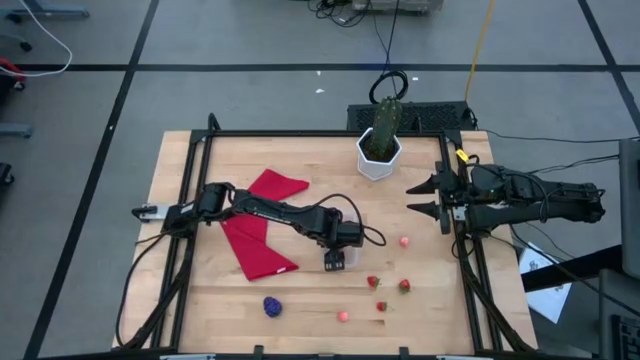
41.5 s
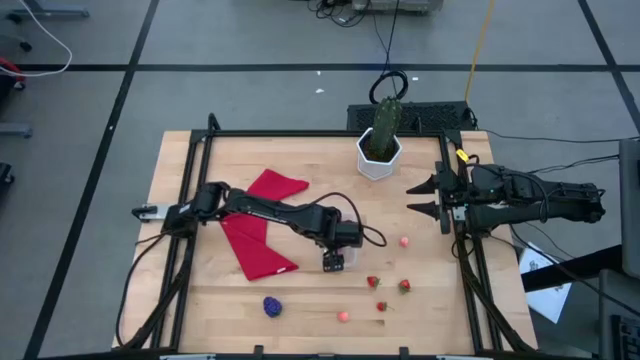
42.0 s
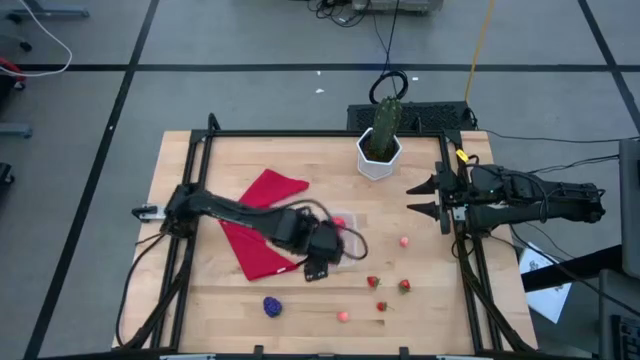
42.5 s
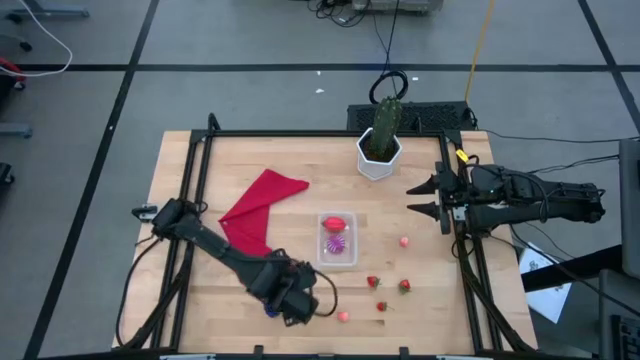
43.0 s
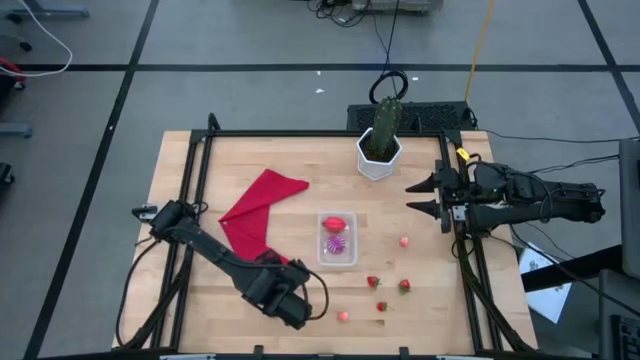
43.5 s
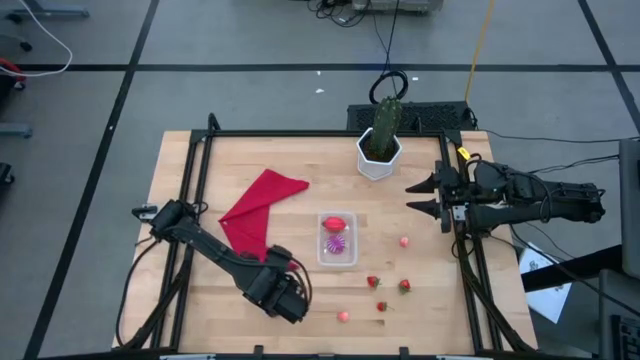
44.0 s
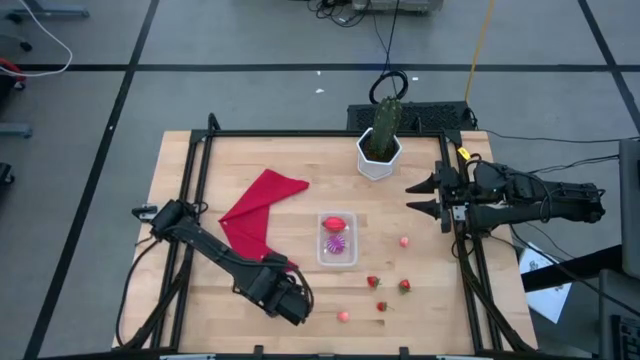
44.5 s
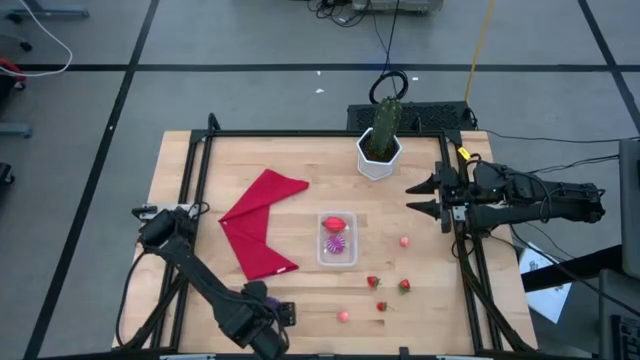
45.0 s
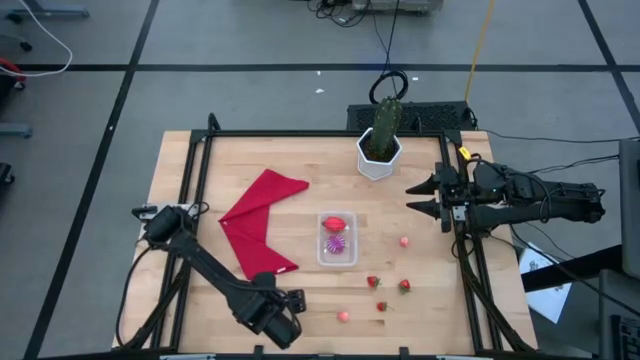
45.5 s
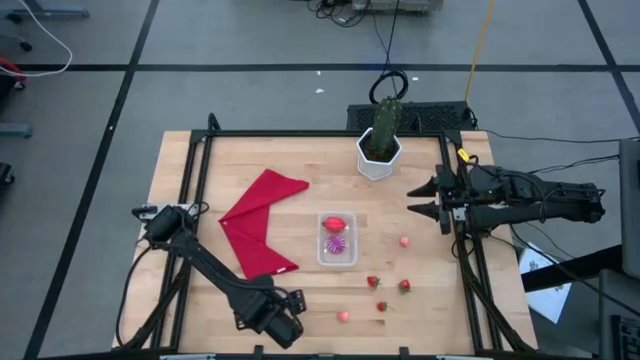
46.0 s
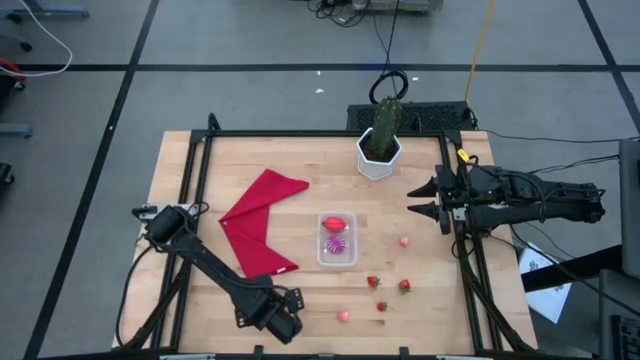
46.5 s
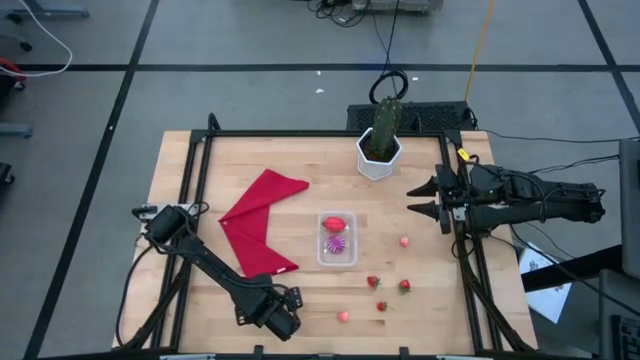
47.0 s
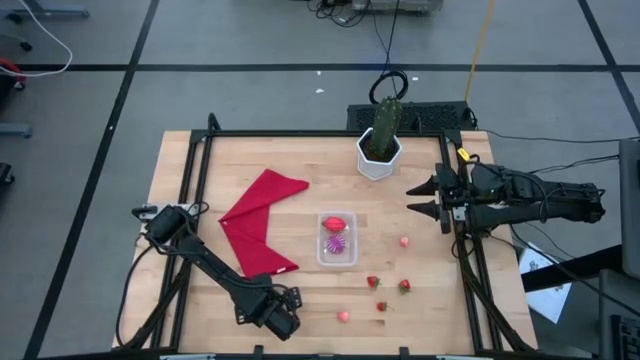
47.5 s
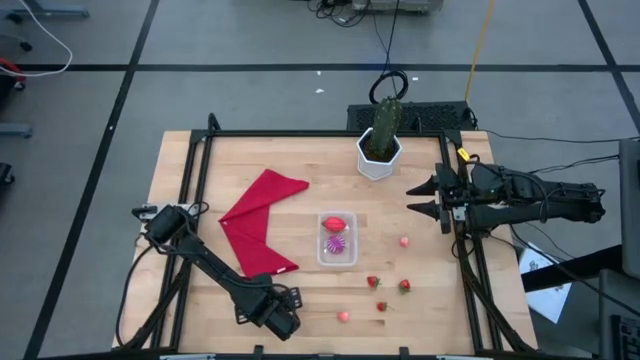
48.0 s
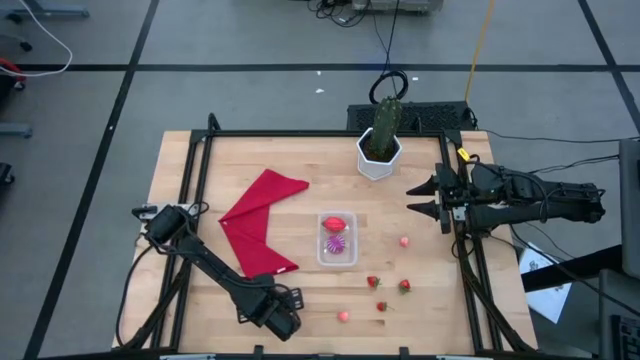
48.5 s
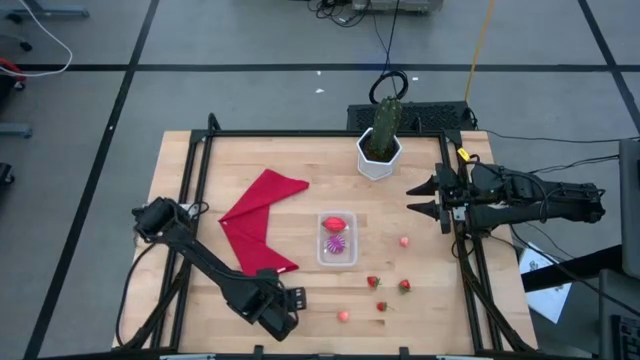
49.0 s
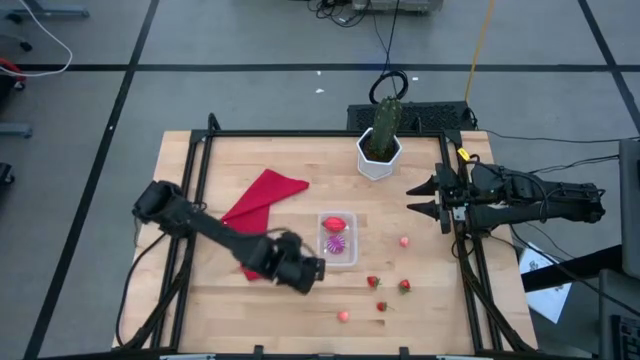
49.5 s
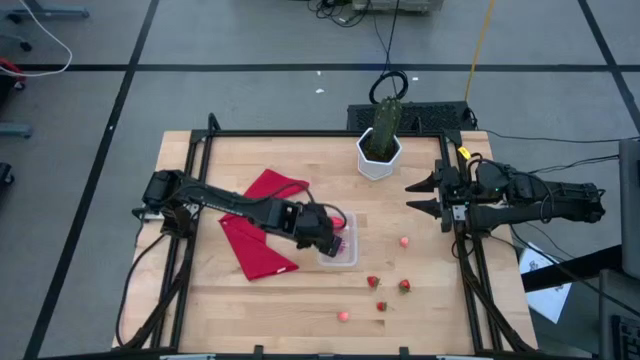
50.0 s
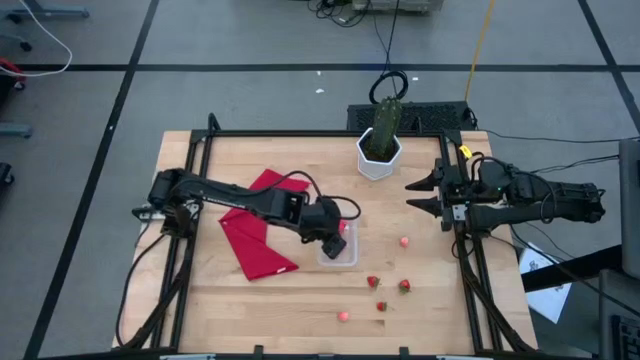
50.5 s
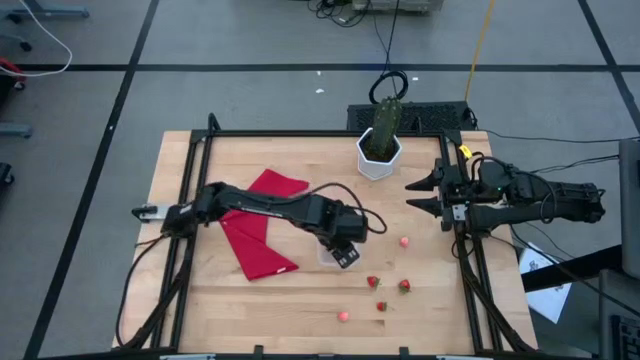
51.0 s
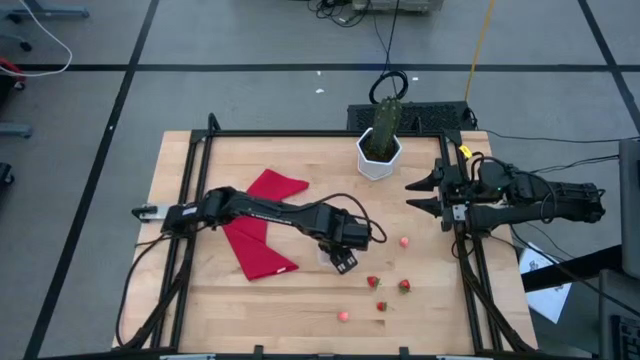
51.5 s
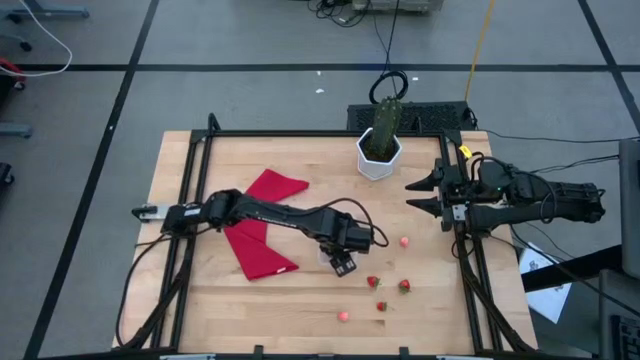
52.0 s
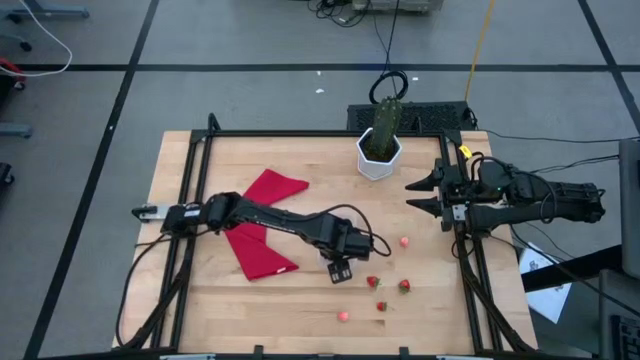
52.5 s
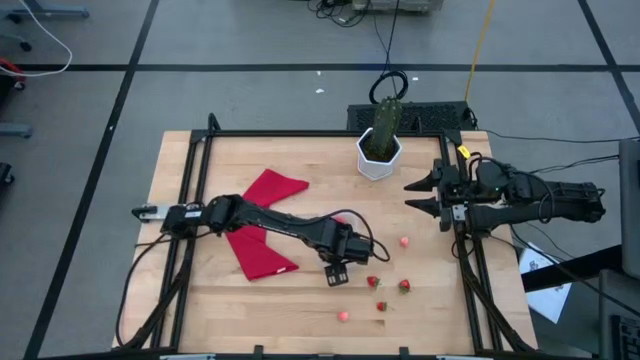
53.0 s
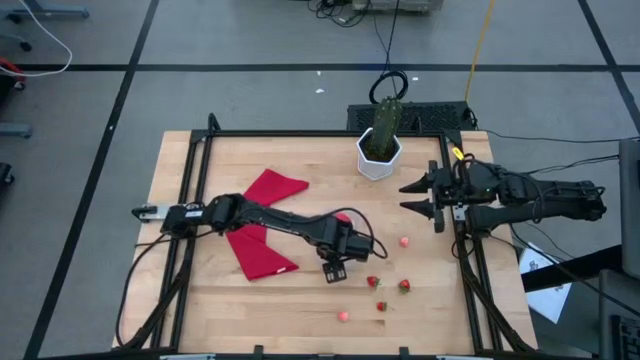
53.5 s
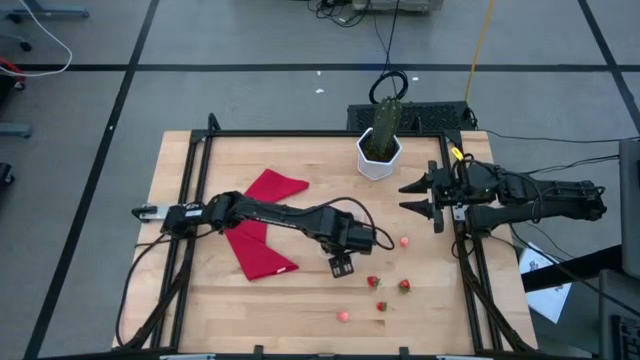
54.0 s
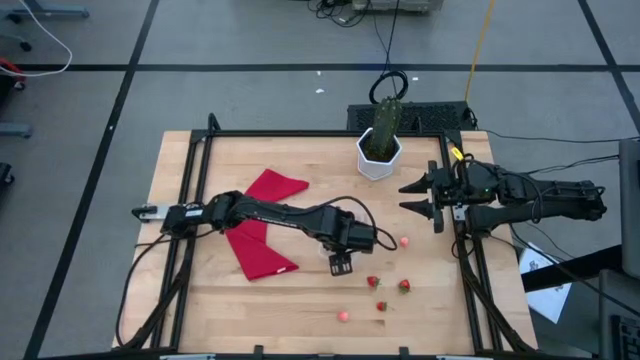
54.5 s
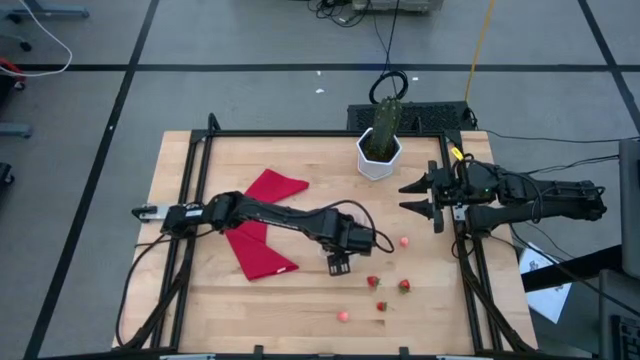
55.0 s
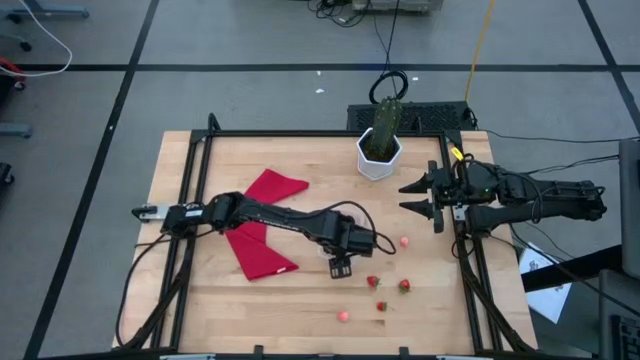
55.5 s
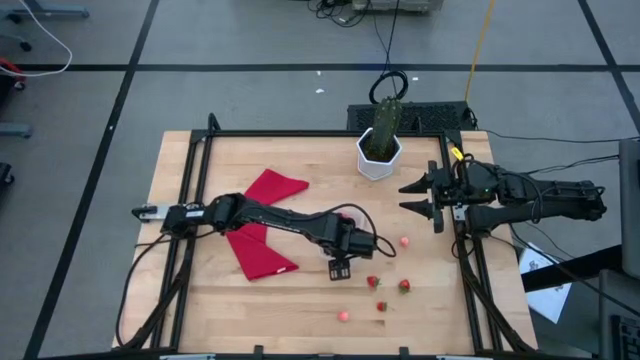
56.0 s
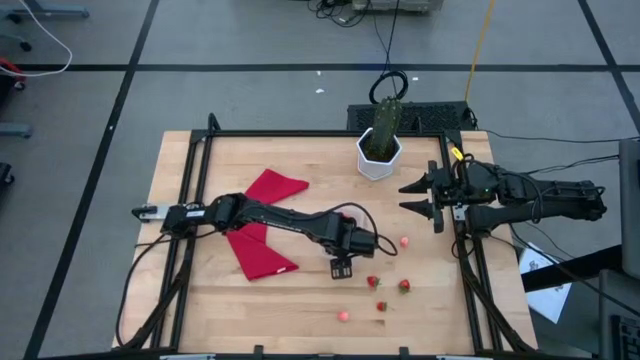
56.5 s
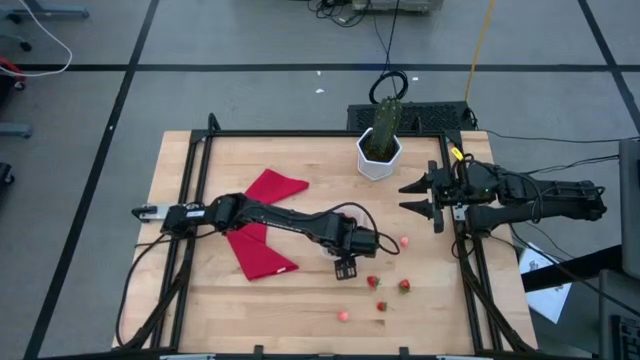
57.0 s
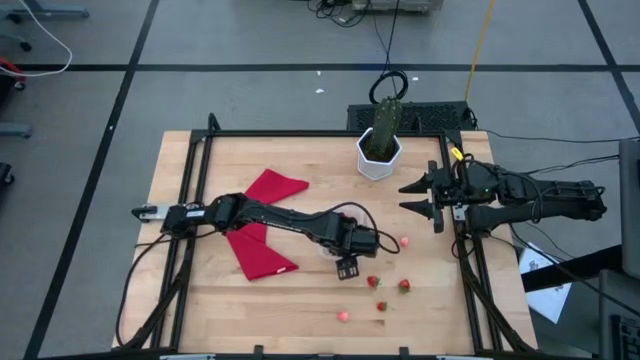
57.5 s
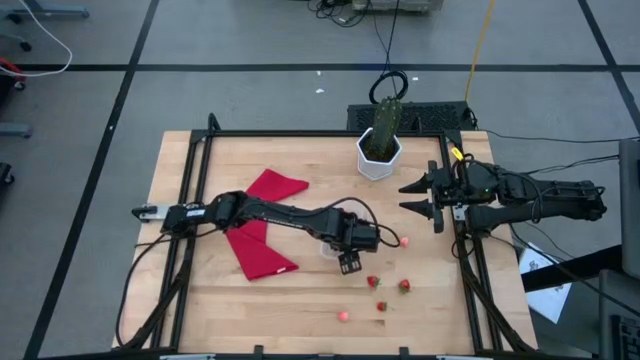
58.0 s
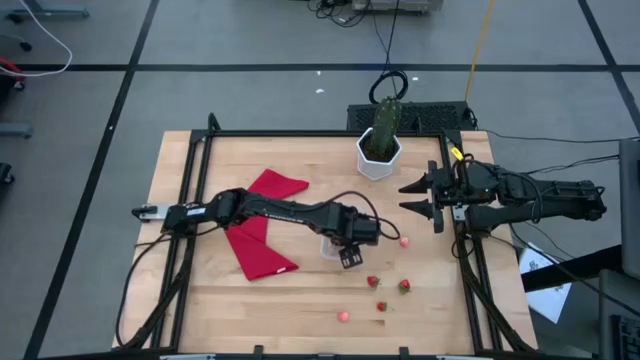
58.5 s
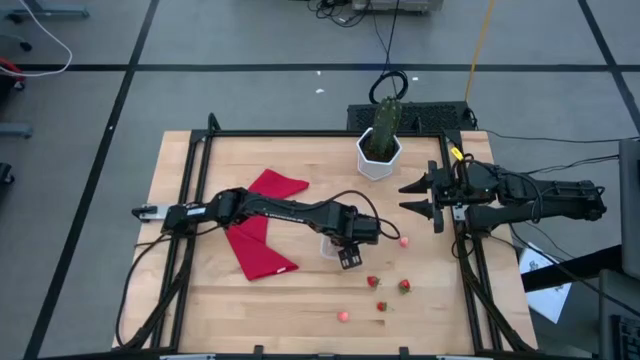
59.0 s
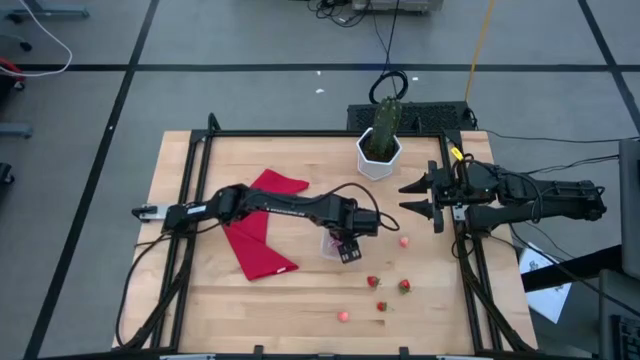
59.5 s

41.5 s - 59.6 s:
Task: Pick and placing Produce into tupperware
Put the blue grapes into the transparent bin
